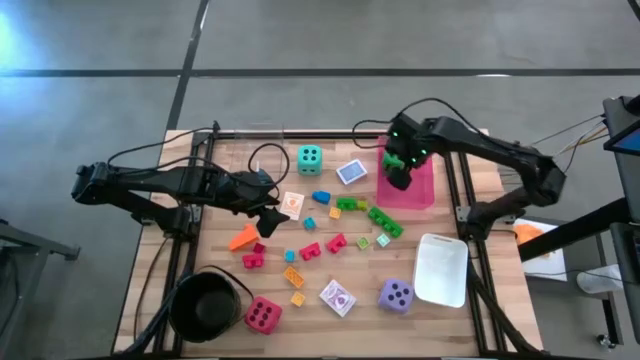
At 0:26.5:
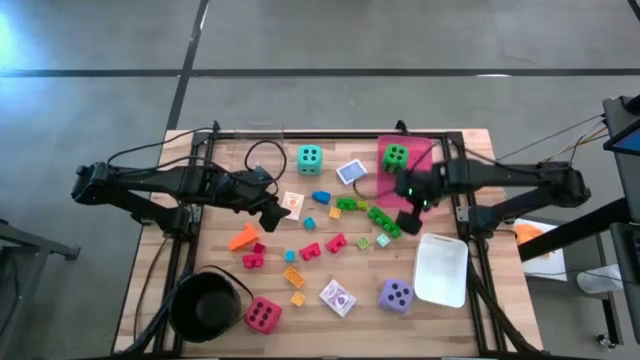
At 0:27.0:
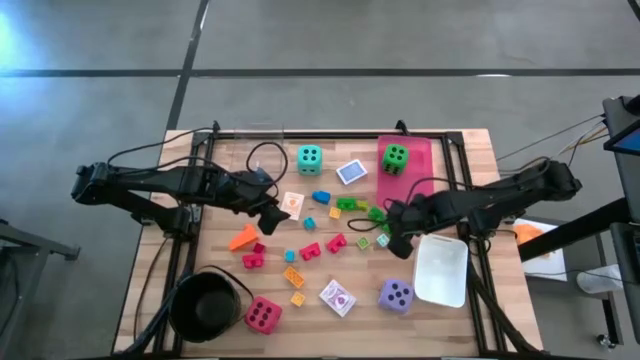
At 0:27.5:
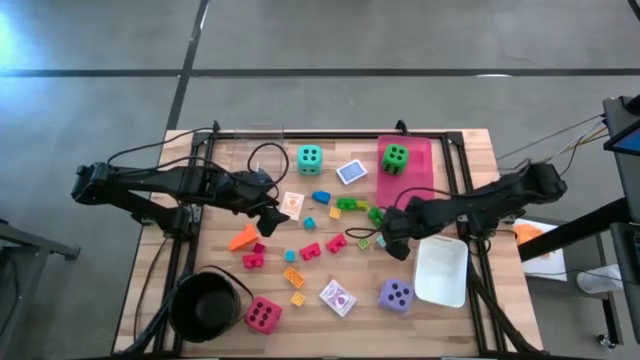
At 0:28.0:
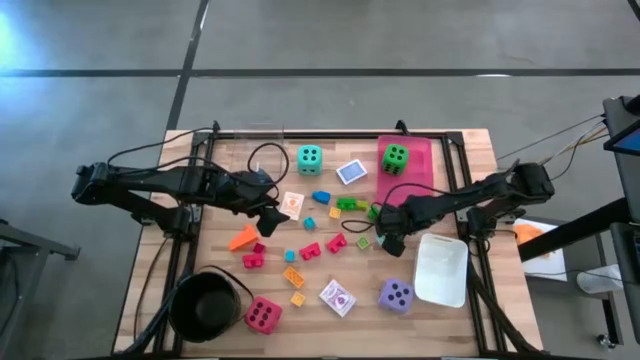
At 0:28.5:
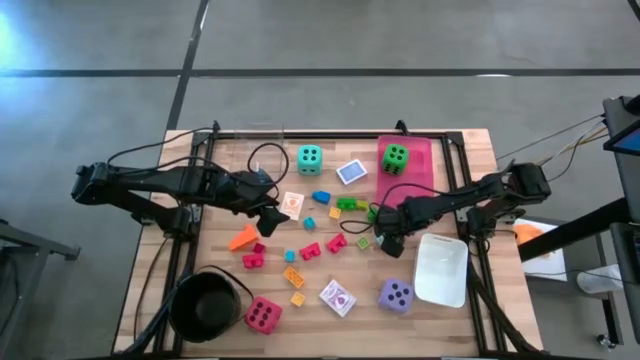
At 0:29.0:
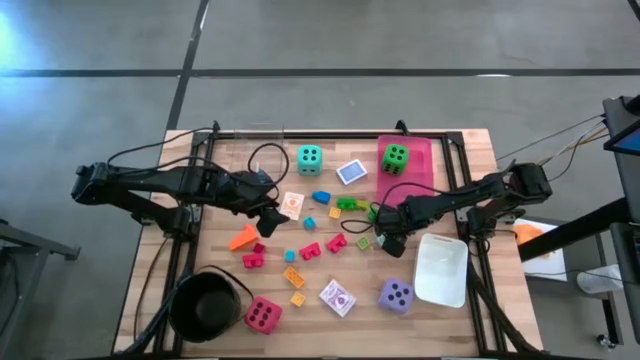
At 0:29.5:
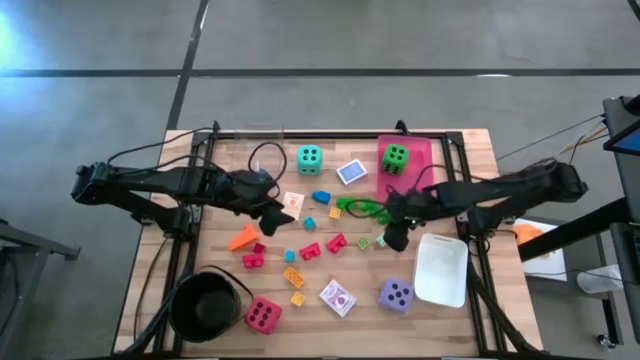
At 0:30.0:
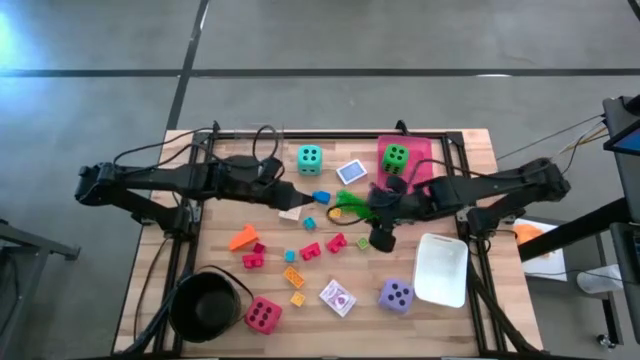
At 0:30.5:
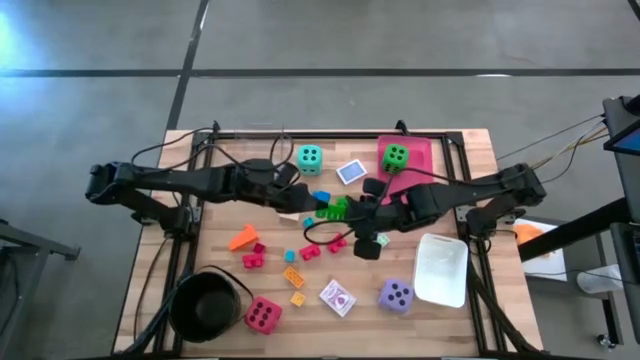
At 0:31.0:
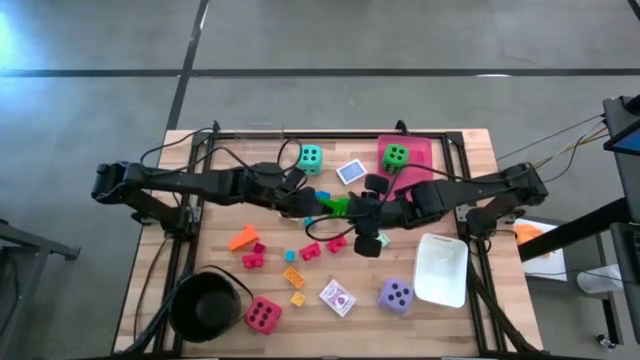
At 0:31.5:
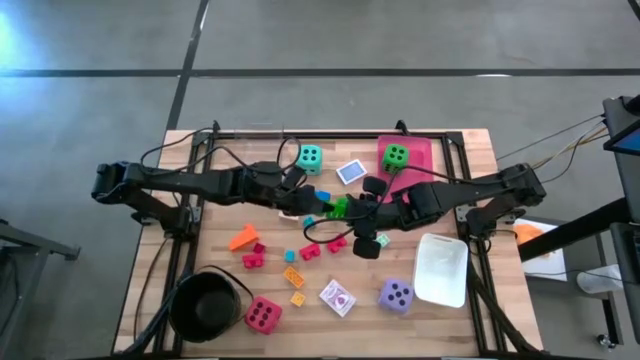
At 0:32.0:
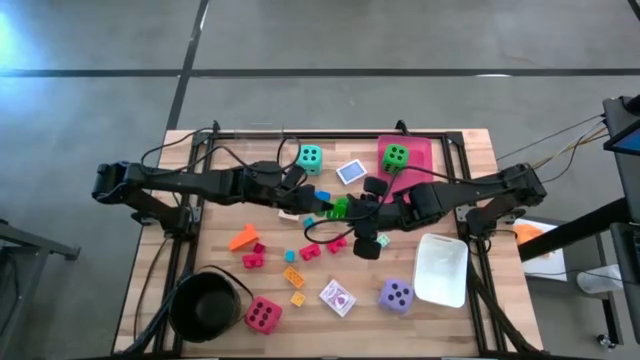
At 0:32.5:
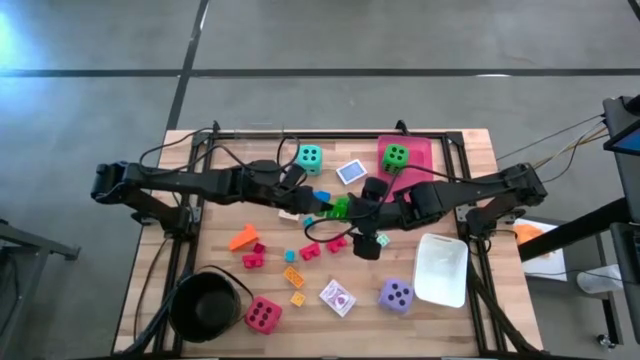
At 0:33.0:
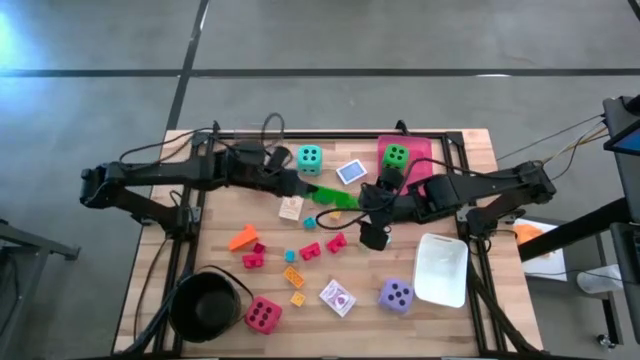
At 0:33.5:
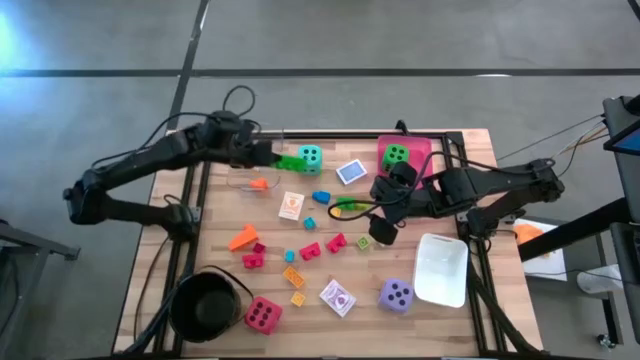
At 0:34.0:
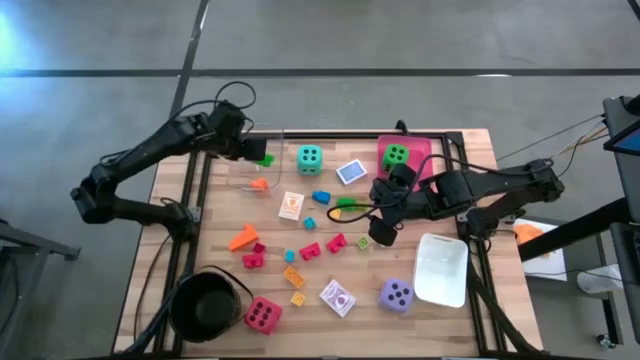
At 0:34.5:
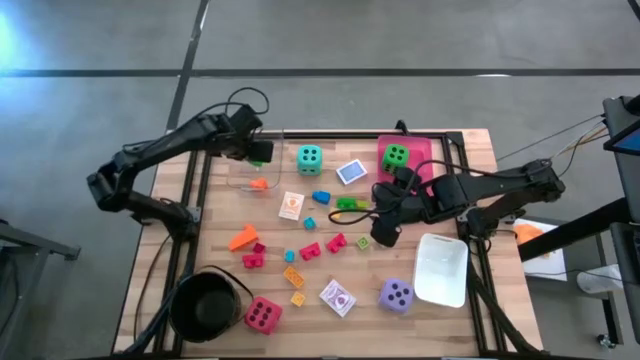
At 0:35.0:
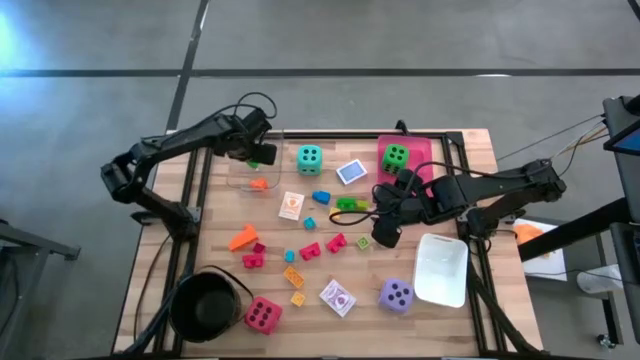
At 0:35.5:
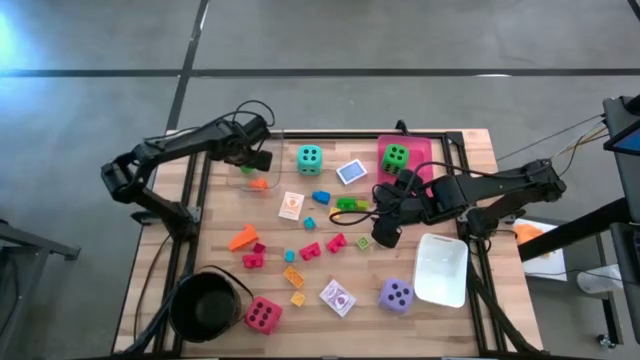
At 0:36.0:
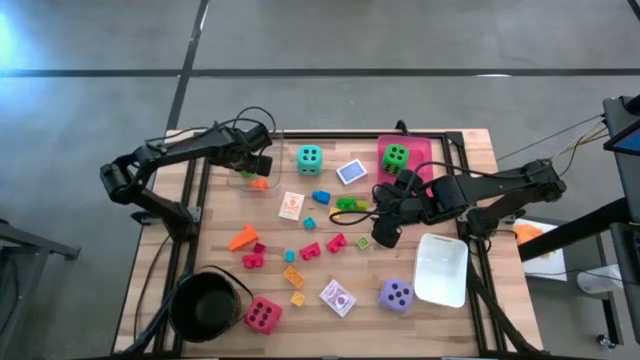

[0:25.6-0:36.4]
Task: Pick & Place Toys
Put the green game piece into the transparent bin

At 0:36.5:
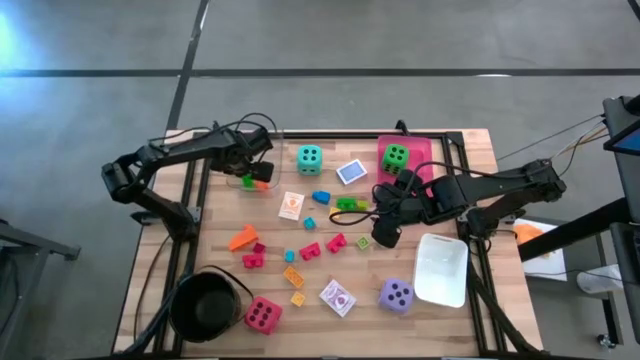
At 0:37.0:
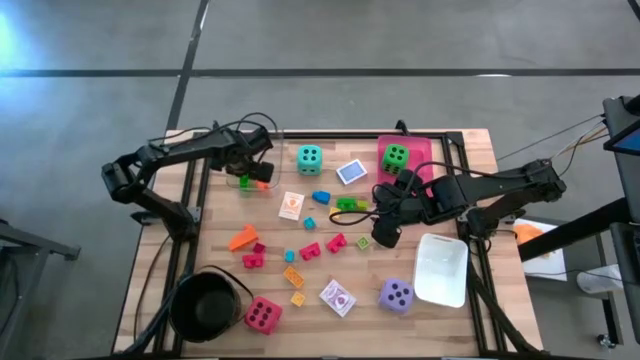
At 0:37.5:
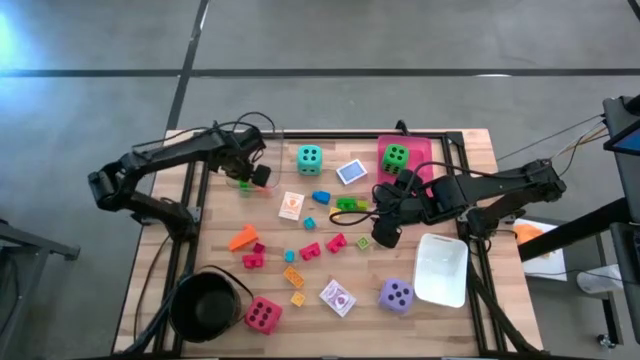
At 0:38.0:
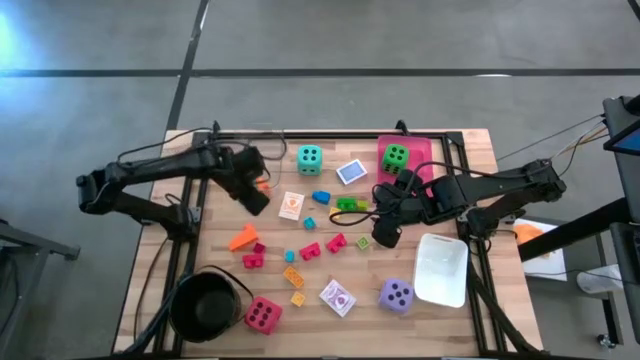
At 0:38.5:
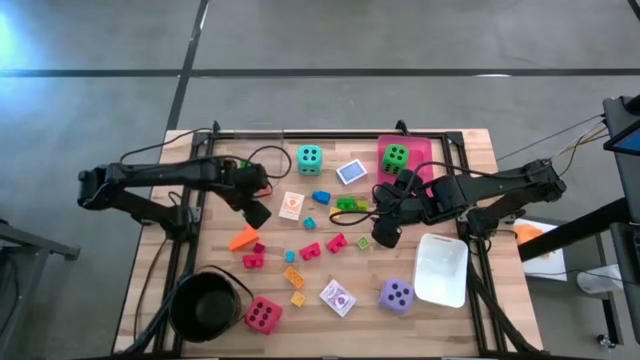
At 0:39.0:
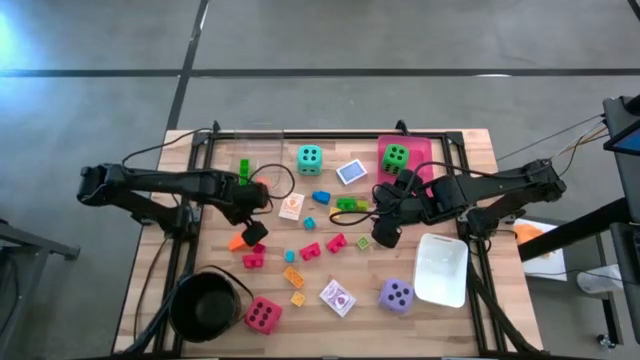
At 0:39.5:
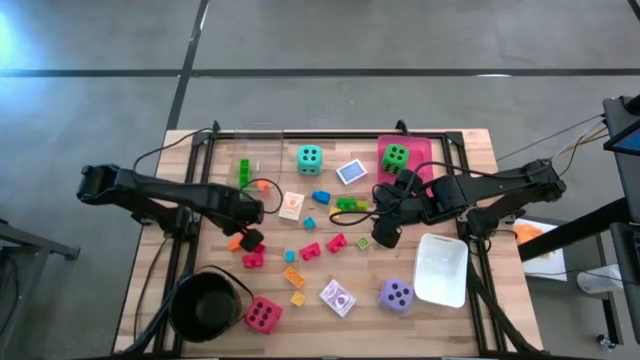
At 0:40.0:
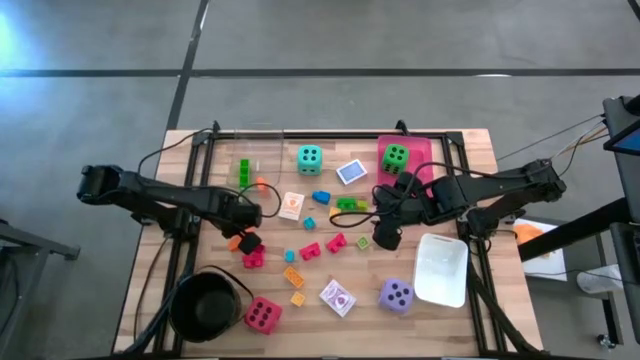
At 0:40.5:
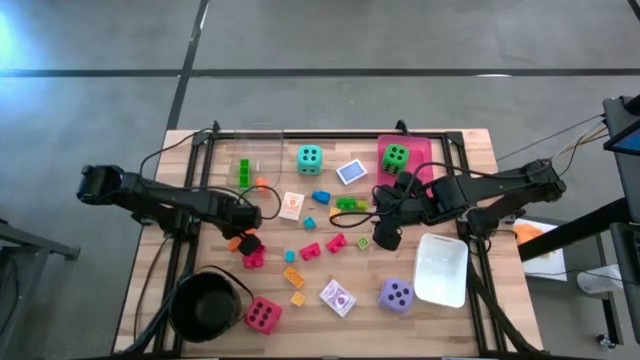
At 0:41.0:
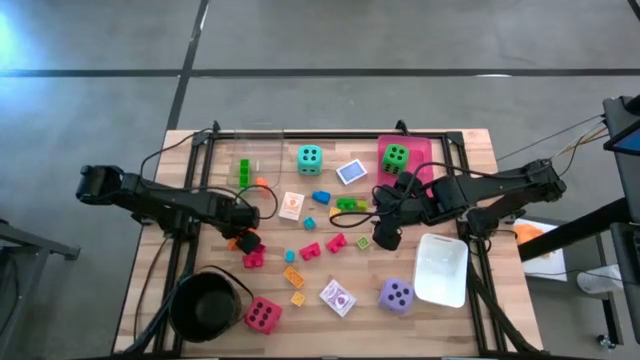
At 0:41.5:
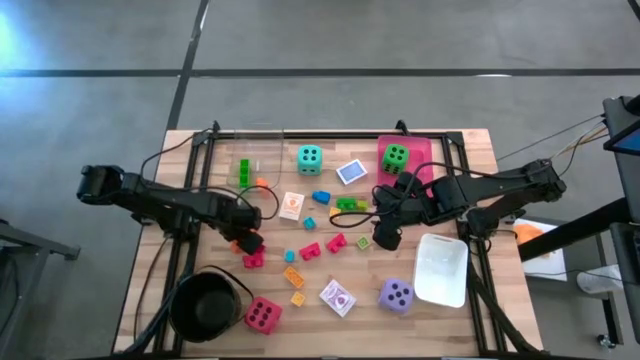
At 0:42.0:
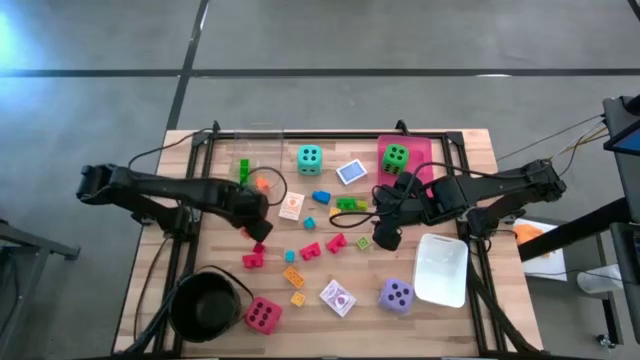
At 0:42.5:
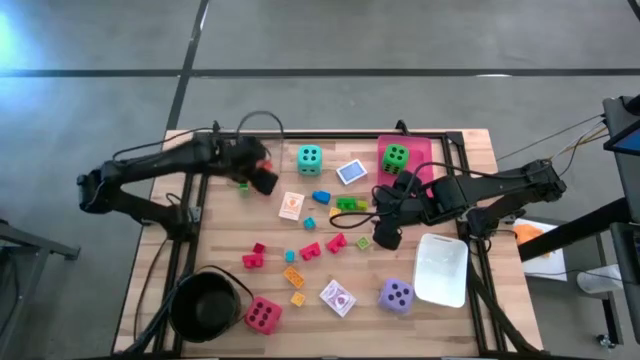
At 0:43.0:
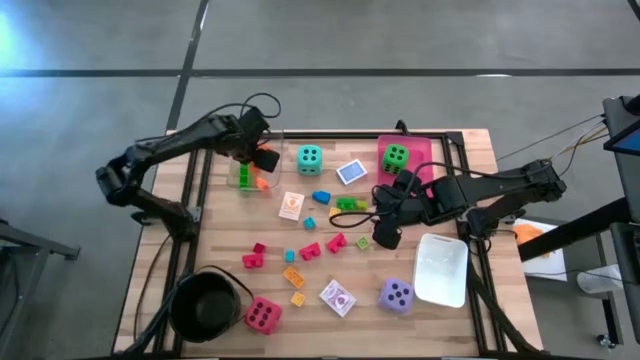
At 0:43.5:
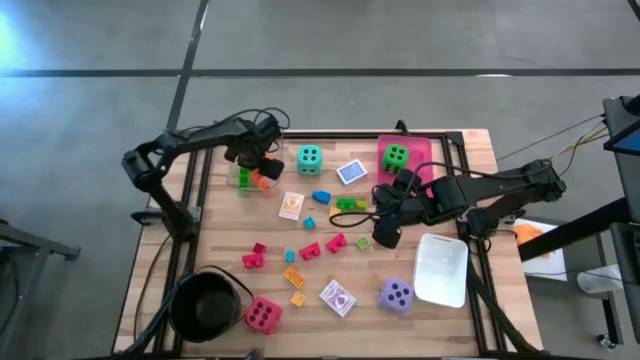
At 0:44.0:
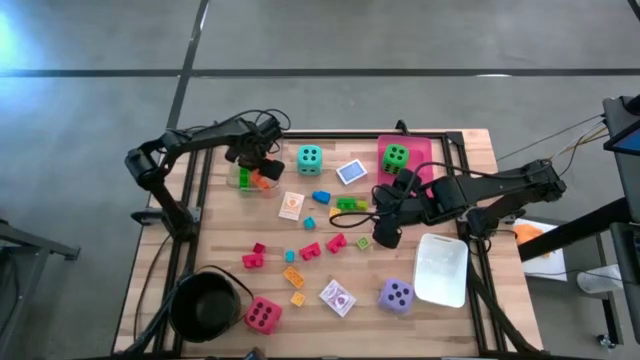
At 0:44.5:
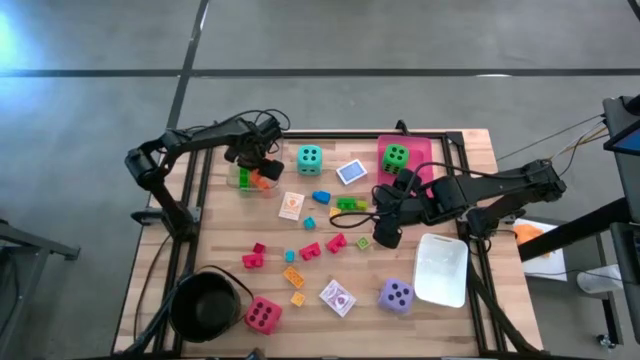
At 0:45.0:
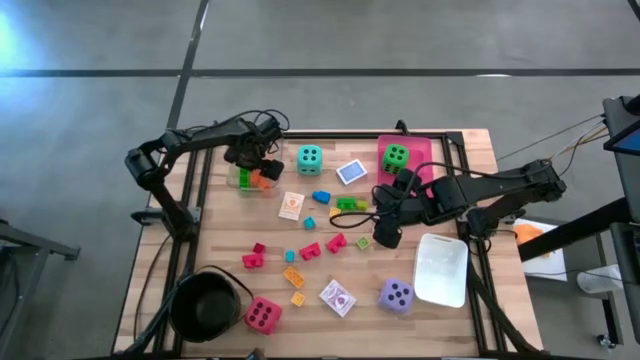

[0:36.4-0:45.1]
Put the orange game piece into the transparent bin

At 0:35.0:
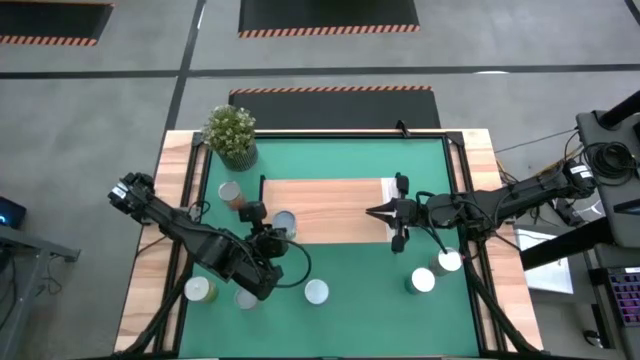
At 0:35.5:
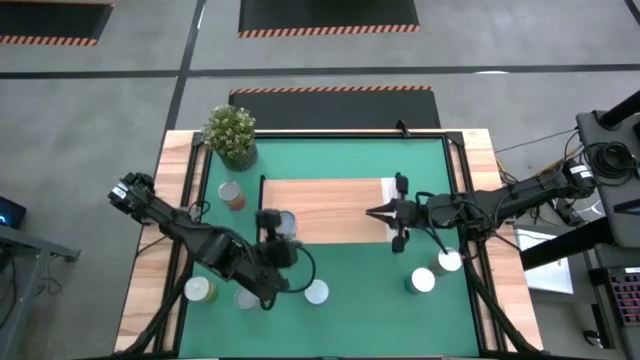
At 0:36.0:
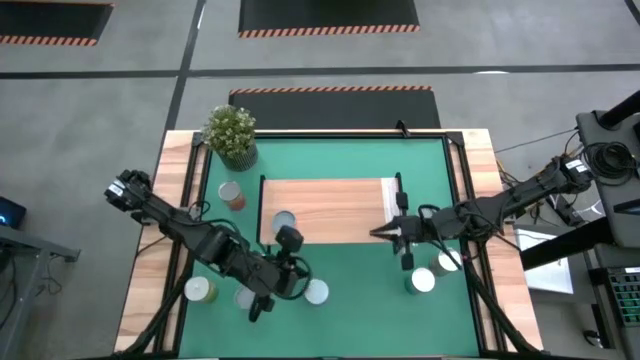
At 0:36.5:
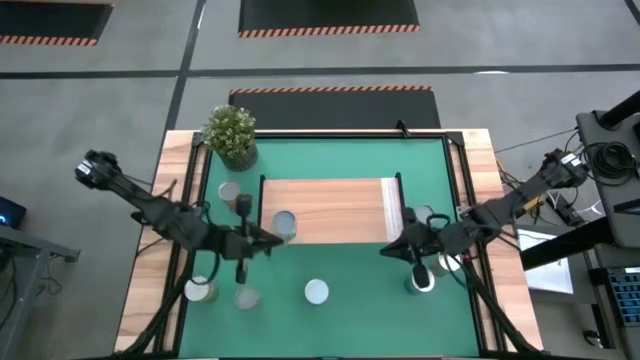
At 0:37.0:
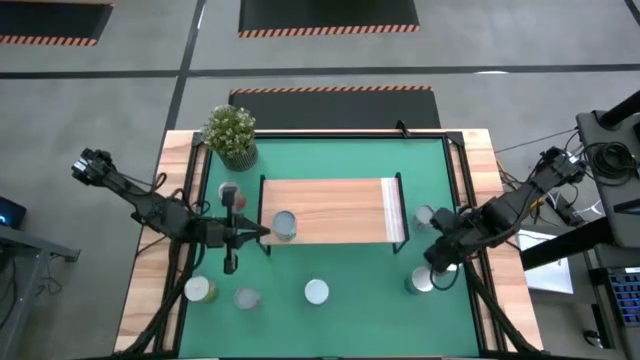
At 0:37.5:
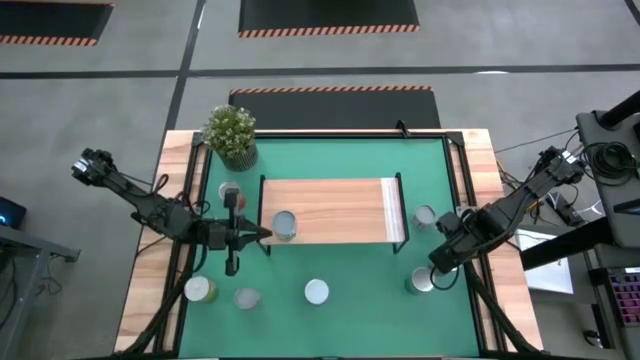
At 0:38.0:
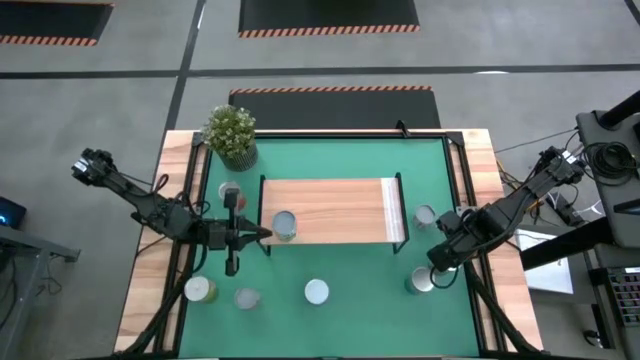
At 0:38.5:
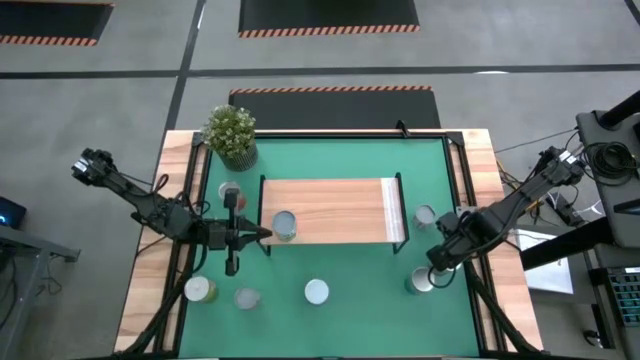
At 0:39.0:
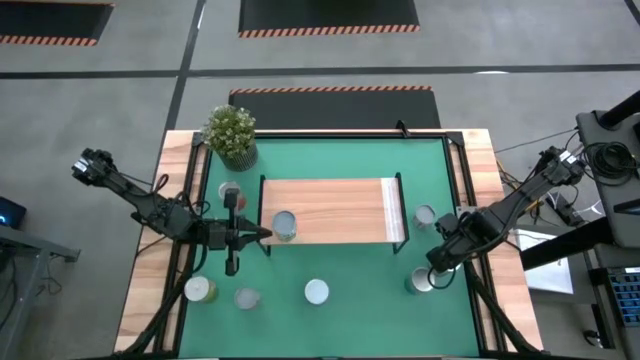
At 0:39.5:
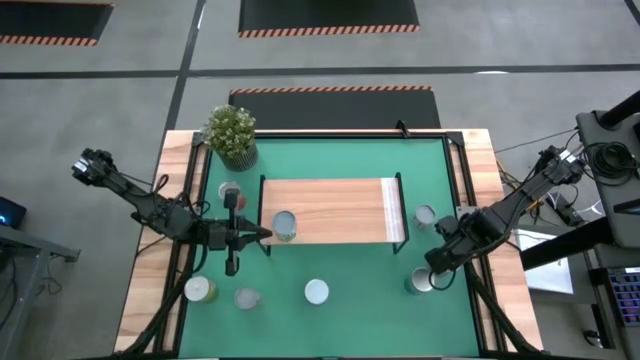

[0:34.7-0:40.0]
Task: Pick and place cans onto a shelf
Put the canned of peaches on the shelf
